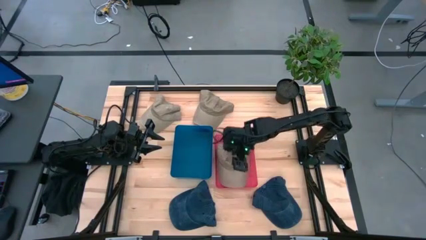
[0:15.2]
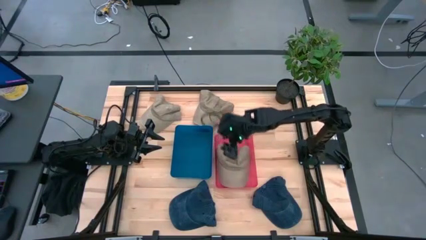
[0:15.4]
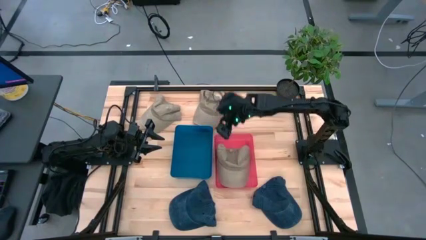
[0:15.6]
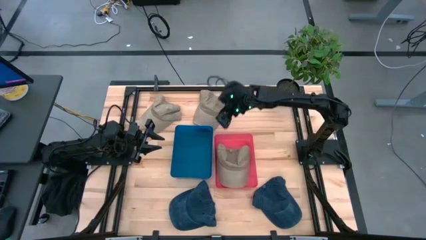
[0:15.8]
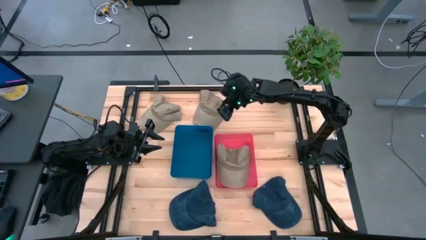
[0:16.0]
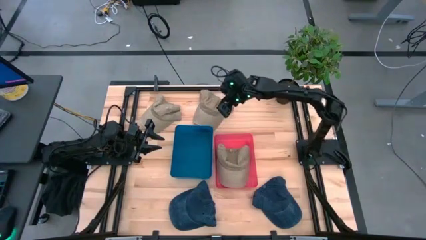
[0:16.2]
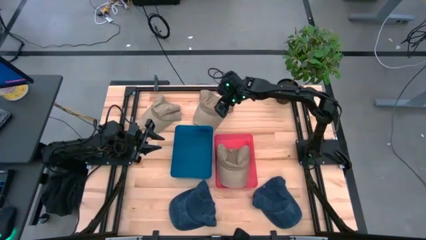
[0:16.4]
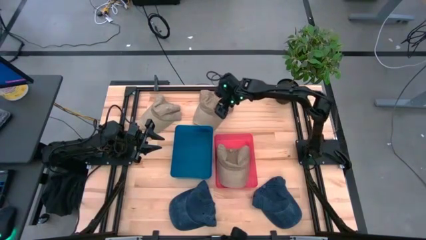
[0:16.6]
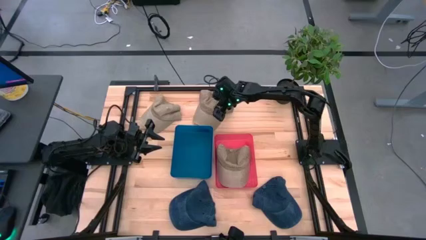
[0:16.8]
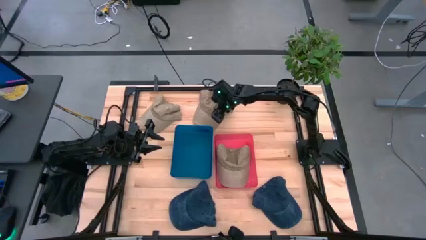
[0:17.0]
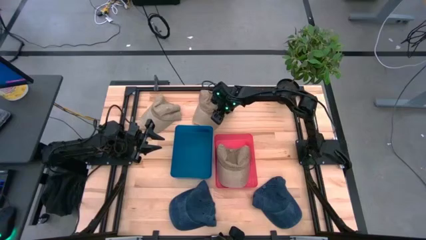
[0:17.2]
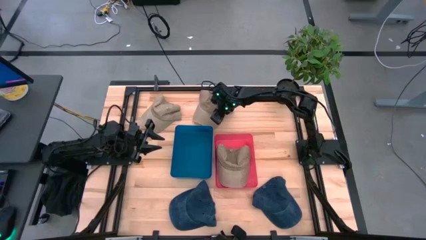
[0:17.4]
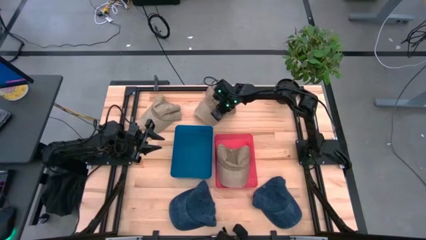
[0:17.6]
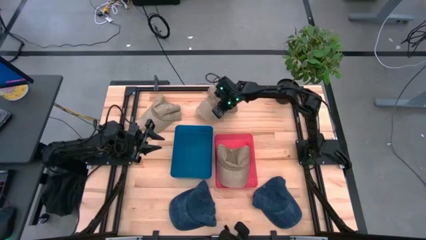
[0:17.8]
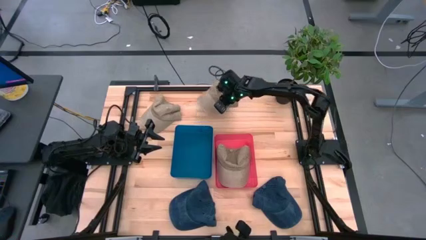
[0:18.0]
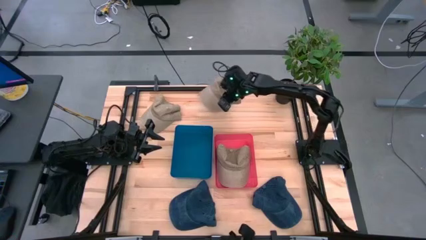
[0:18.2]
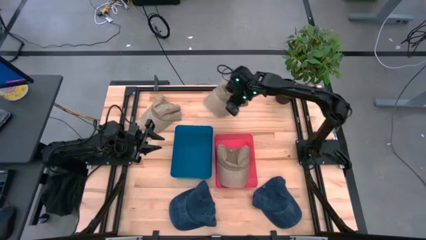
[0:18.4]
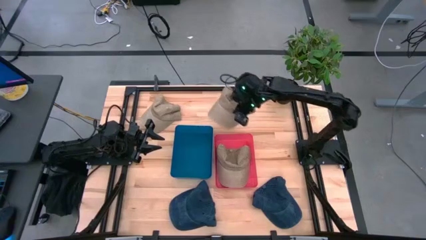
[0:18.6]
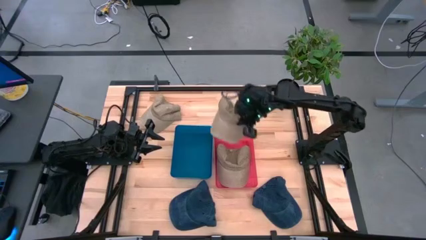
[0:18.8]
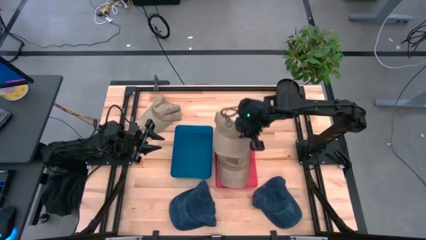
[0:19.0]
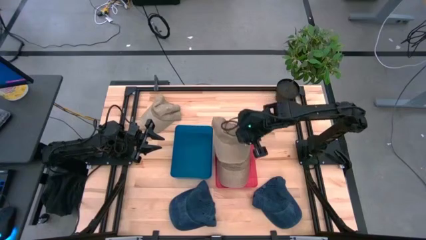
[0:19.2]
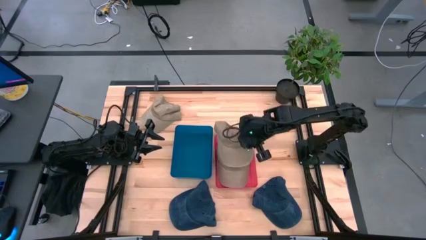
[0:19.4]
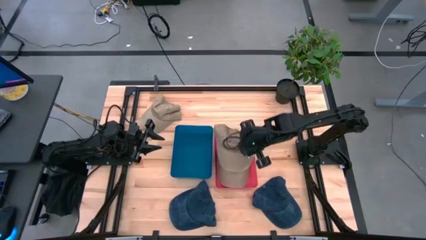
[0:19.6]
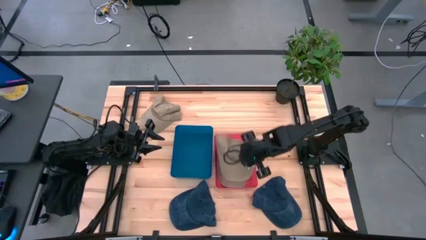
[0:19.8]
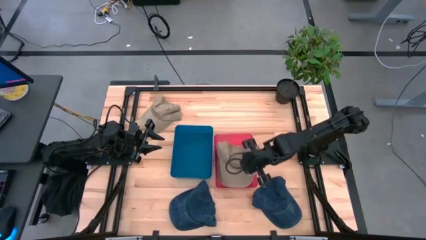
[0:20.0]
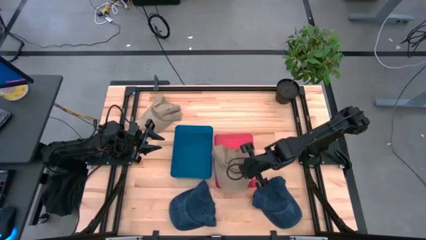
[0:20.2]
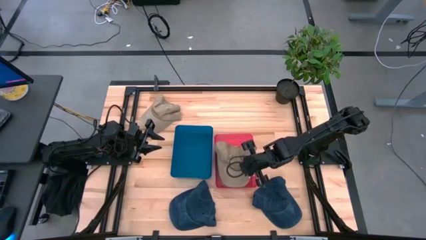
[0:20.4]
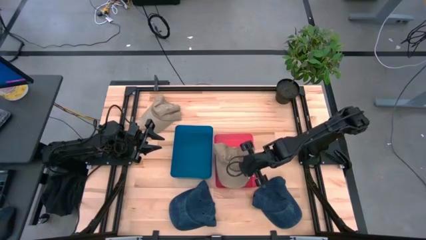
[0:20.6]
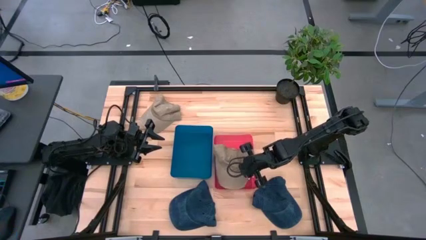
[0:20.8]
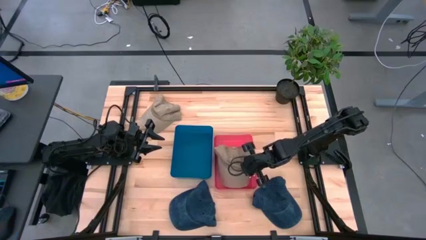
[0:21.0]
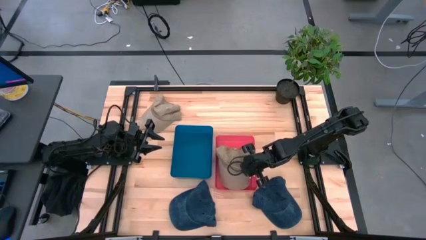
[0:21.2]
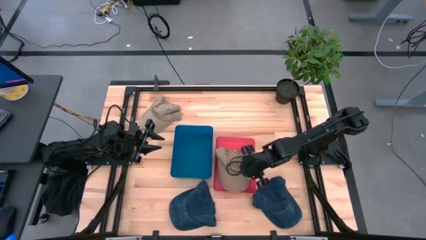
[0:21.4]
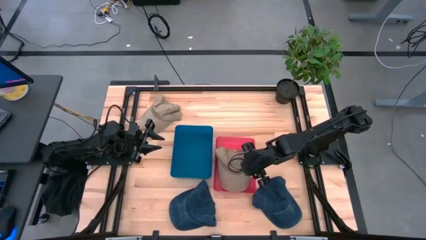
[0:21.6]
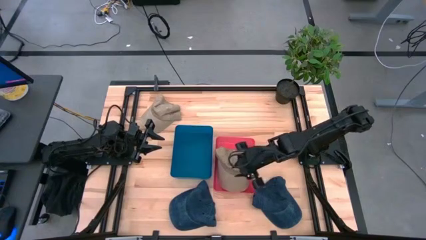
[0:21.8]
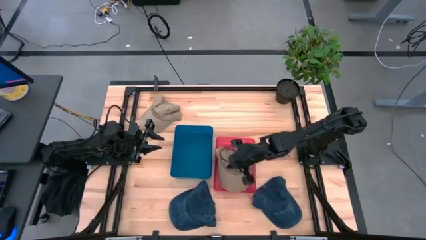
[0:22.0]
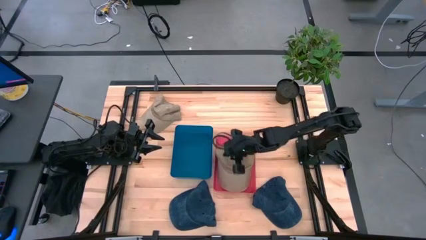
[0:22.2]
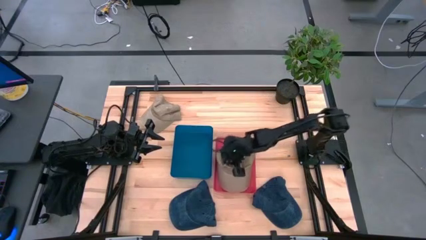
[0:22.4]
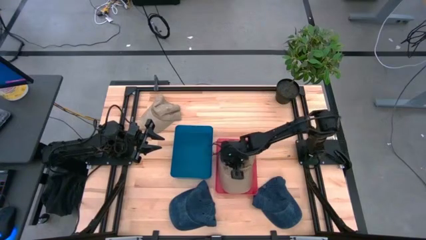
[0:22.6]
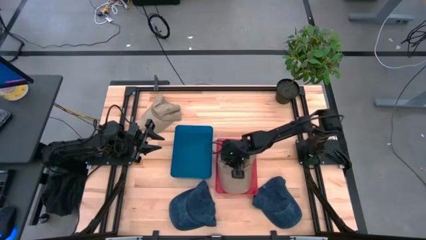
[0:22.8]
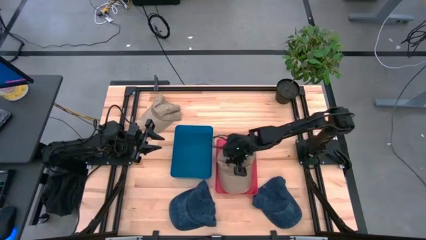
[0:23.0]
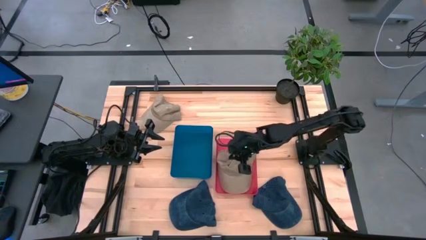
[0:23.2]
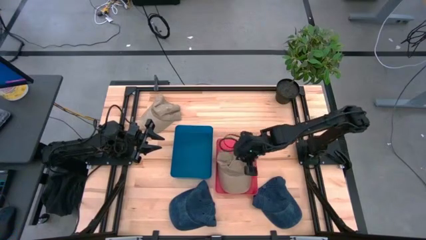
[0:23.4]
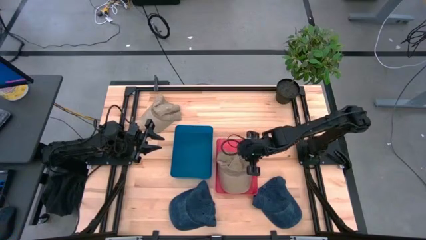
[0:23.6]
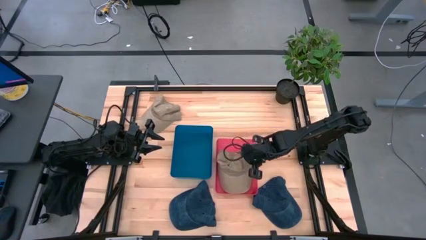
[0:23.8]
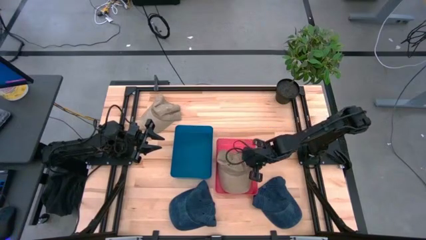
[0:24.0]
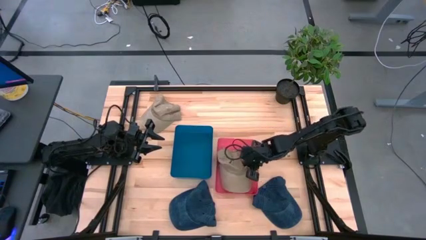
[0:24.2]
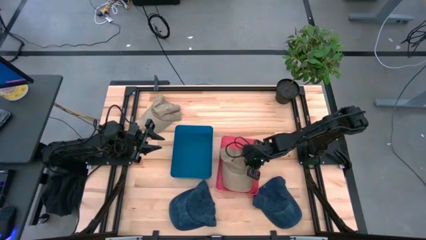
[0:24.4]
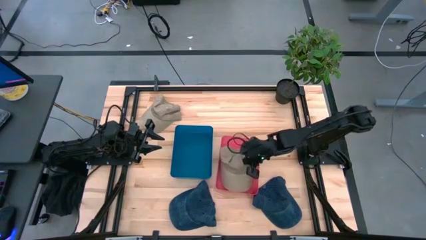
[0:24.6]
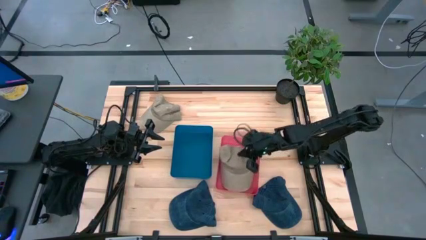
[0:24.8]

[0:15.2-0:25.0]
Task: Pick & Place hat
Put the brown cap into the red bin

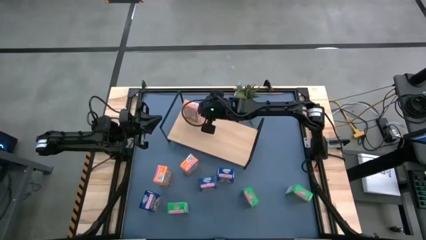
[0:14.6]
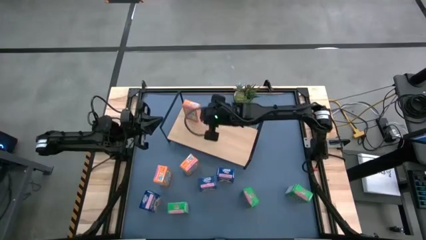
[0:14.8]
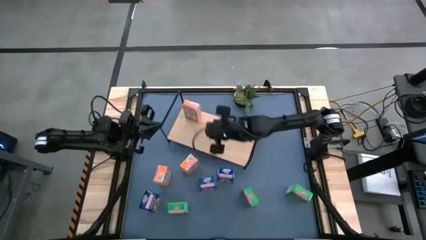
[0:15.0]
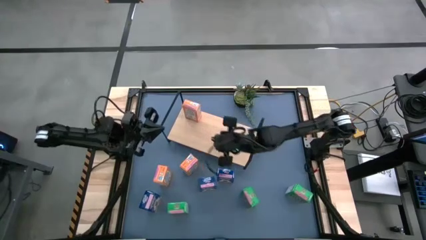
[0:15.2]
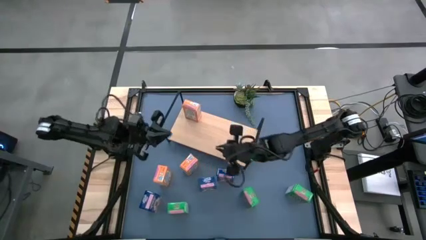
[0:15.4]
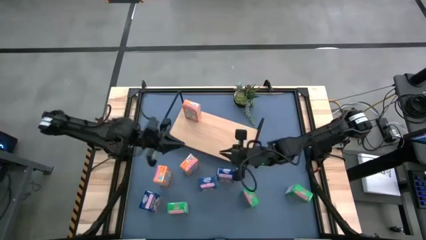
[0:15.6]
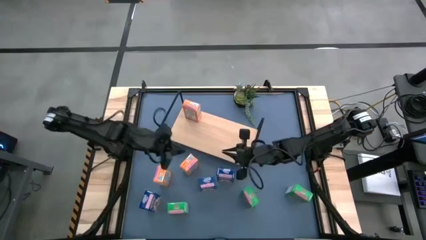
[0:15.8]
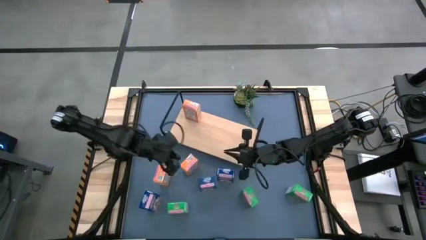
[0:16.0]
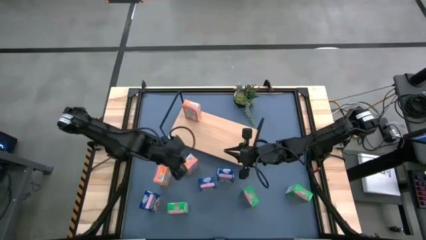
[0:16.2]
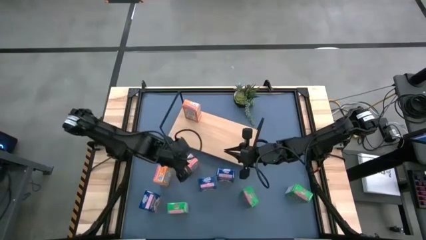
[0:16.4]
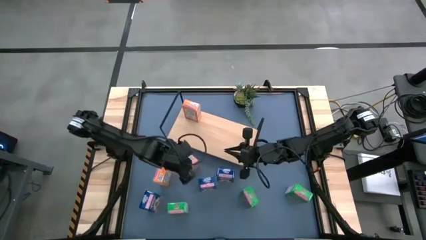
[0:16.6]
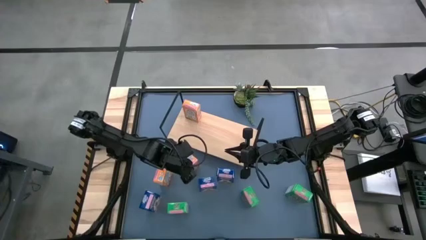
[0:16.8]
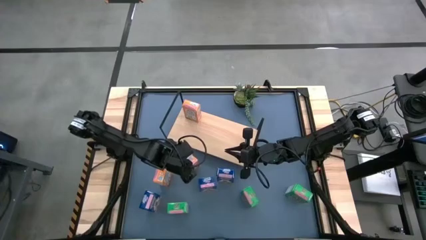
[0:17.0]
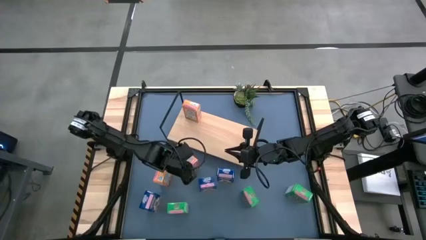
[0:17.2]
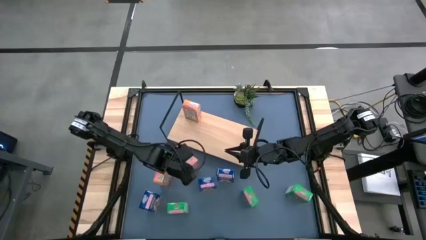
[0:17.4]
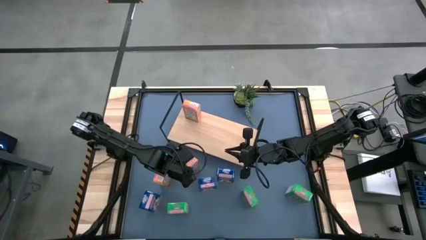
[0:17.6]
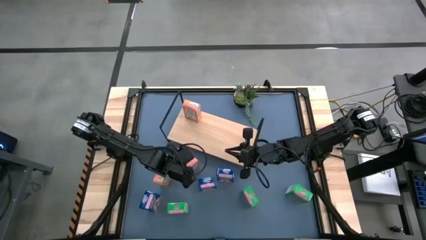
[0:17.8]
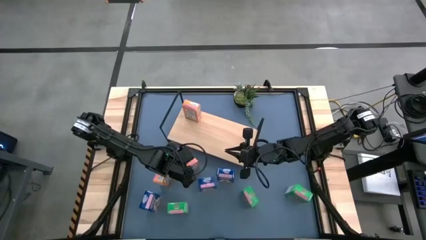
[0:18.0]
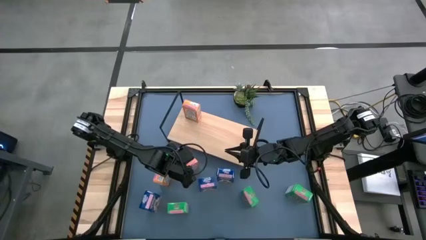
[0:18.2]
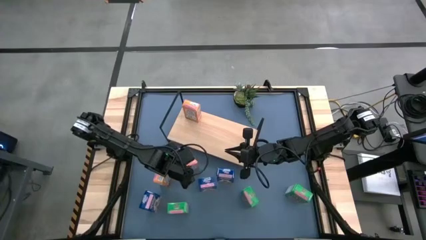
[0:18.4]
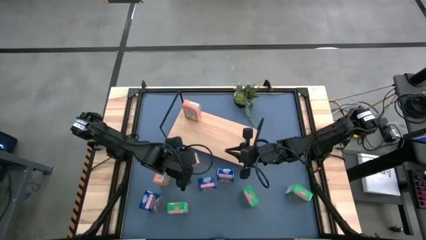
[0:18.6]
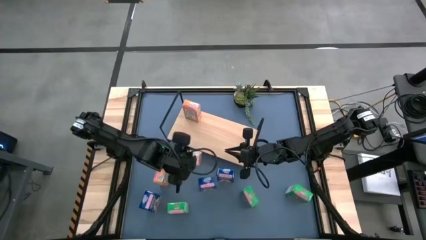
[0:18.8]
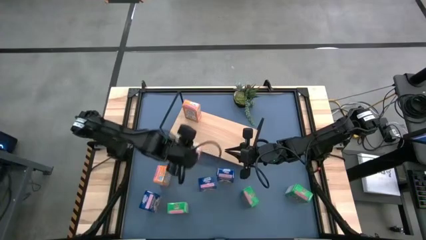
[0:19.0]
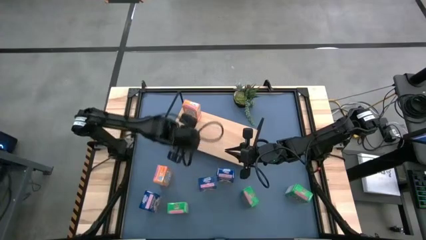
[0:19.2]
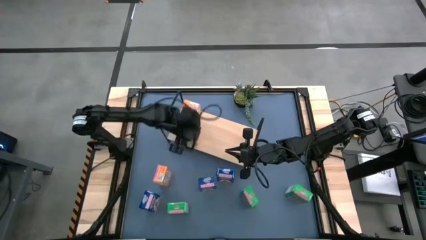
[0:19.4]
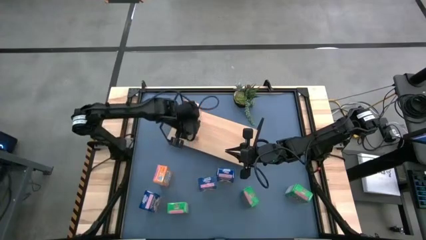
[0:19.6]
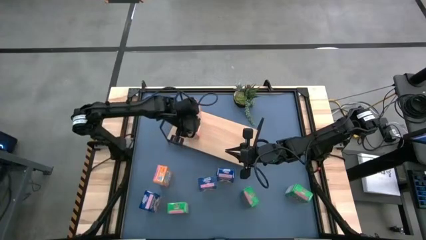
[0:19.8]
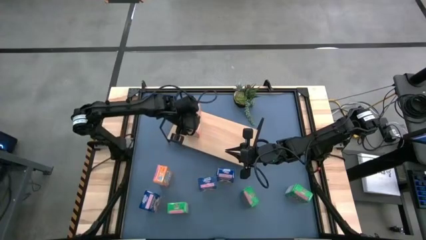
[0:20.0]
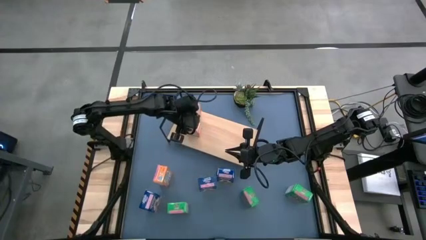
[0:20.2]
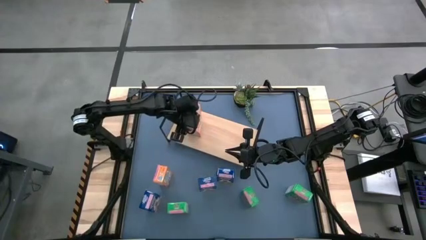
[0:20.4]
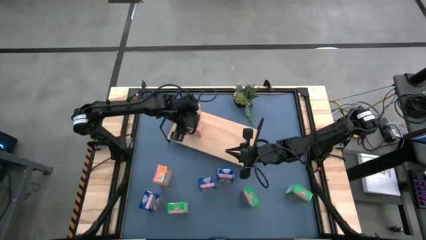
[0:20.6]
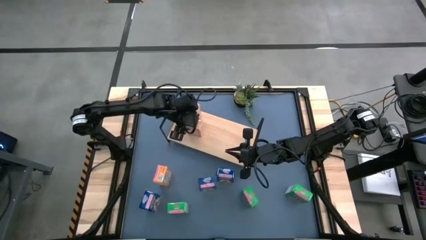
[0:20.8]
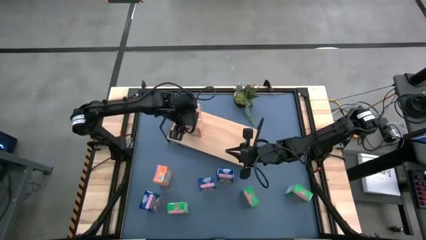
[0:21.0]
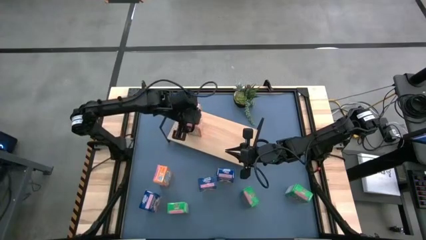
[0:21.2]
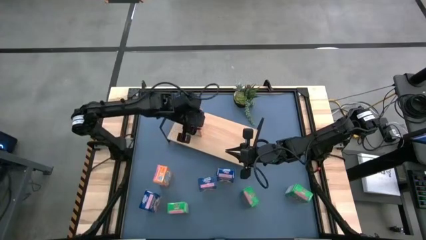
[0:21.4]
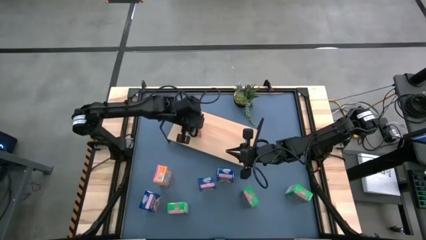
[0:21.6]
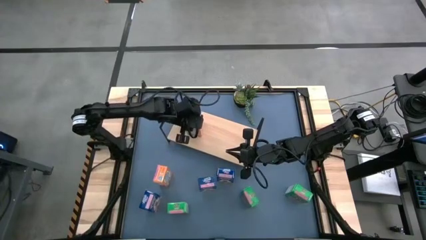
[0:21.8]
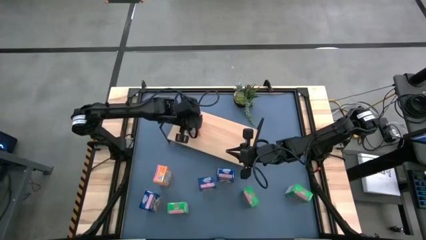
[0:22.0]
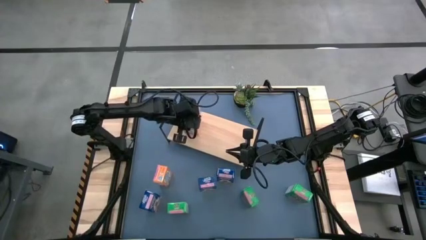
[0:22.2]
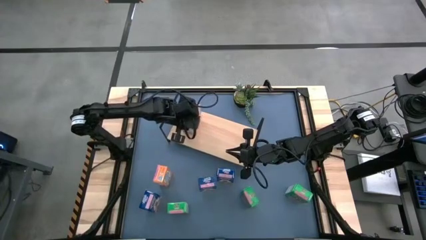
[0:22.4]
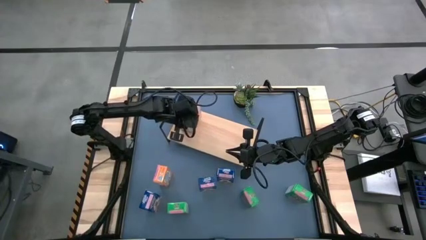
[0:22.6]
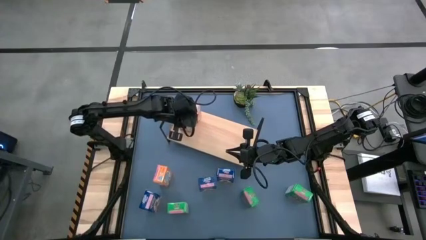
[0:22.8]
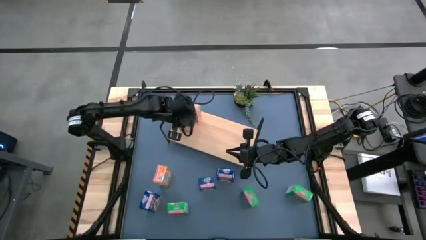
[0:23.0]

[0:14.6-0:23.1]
Task: Stack cereal on shelf
Put the right orange cereal box on the shelf aligned with other orange cereal box
